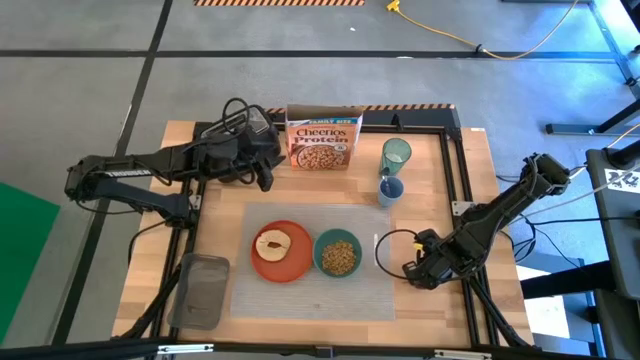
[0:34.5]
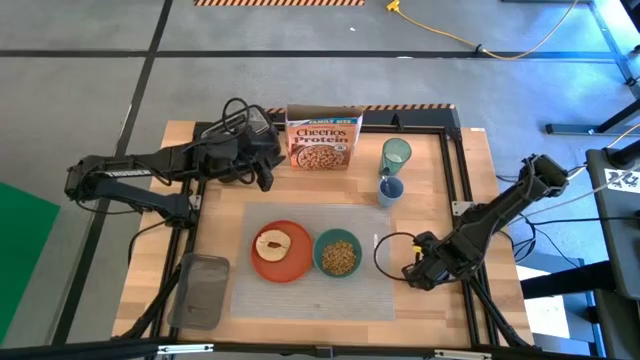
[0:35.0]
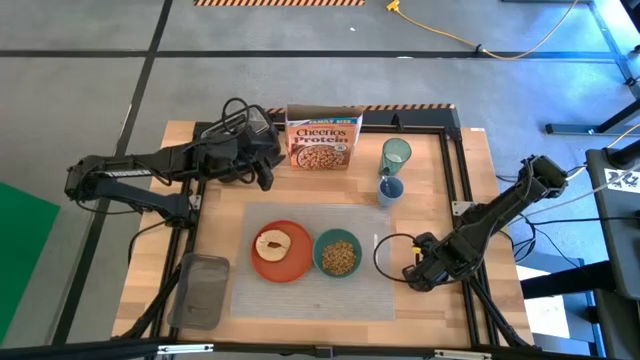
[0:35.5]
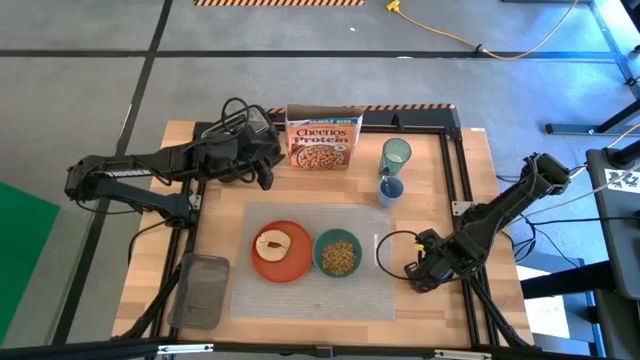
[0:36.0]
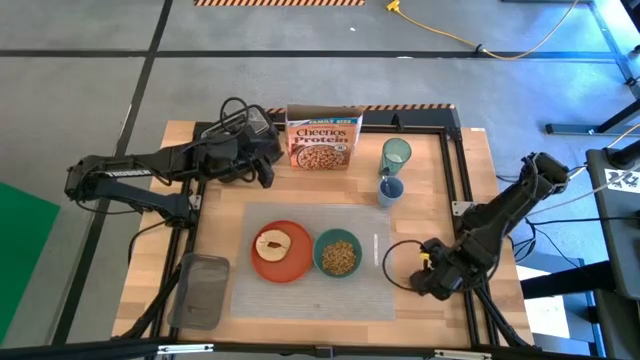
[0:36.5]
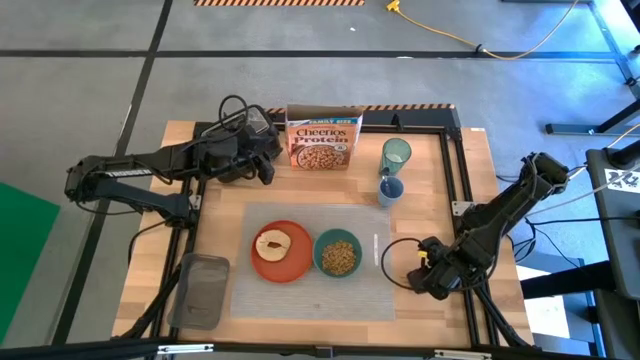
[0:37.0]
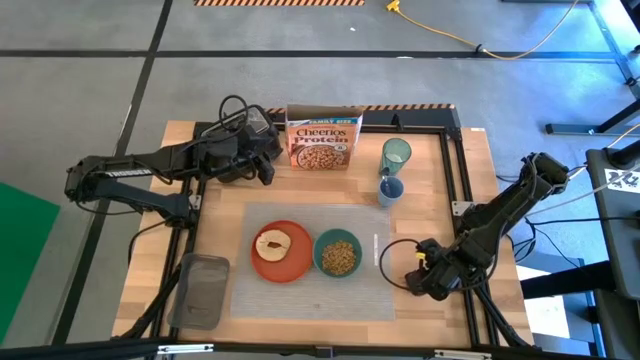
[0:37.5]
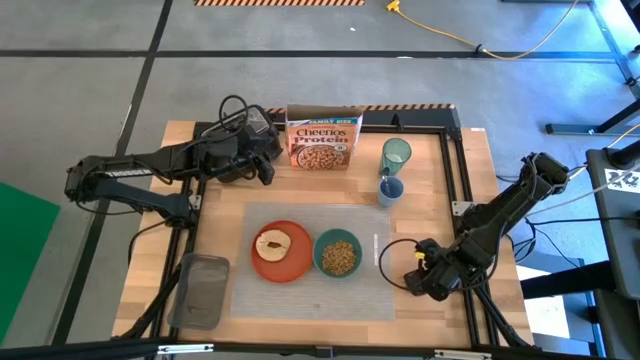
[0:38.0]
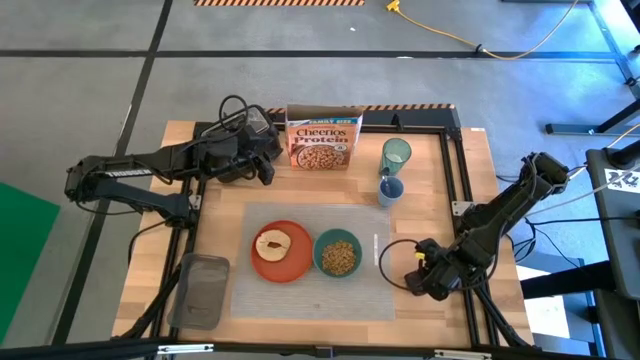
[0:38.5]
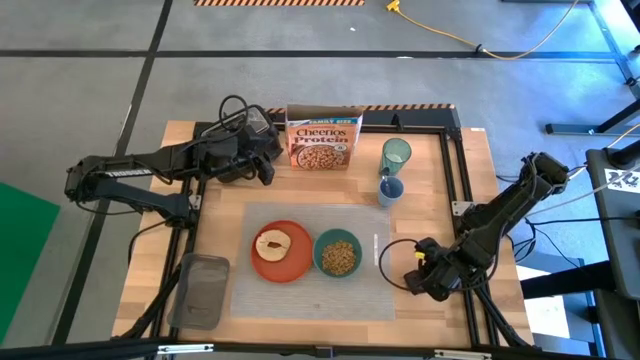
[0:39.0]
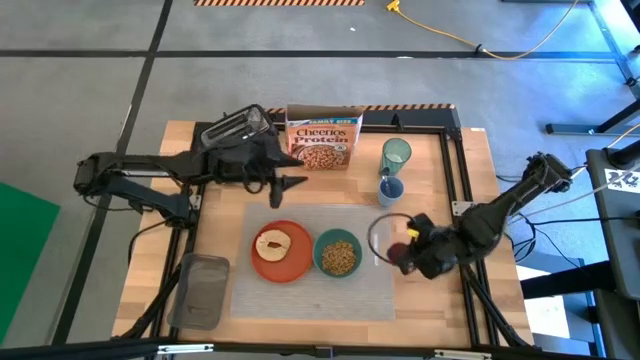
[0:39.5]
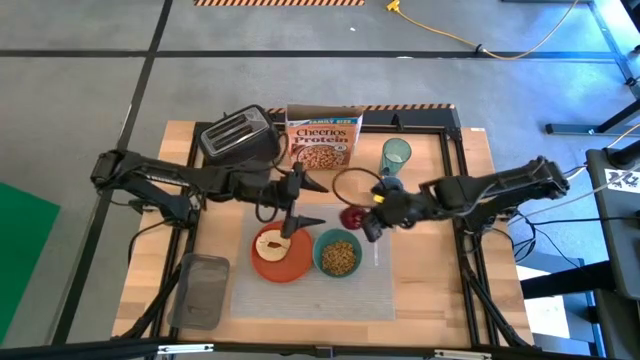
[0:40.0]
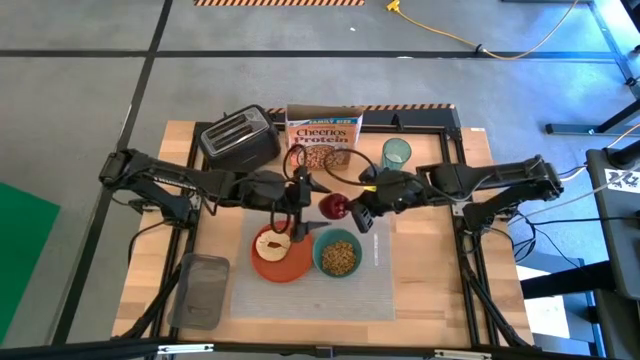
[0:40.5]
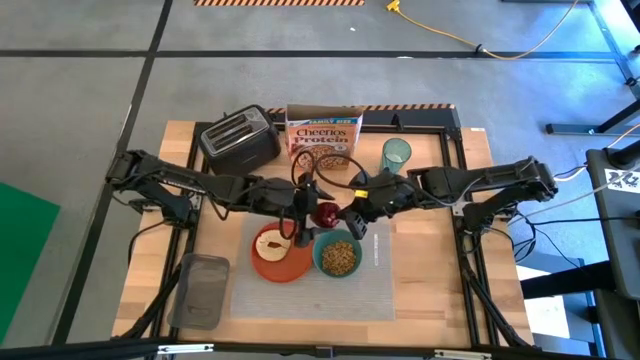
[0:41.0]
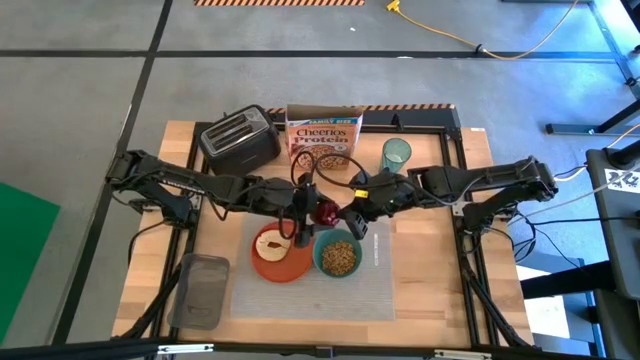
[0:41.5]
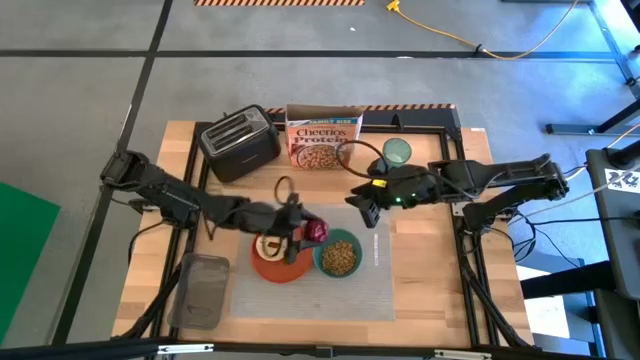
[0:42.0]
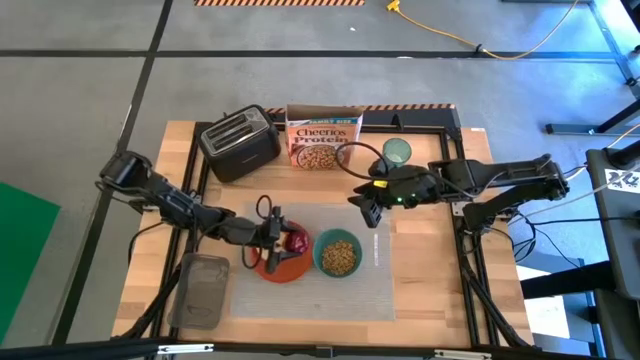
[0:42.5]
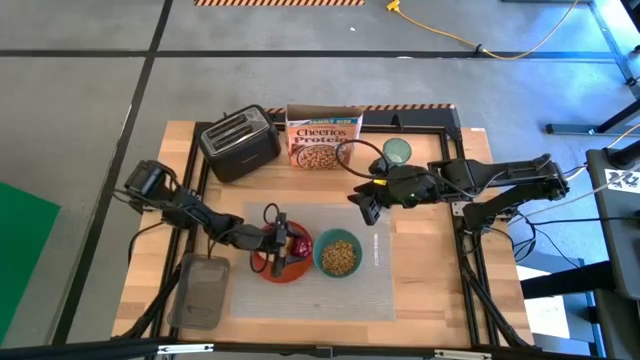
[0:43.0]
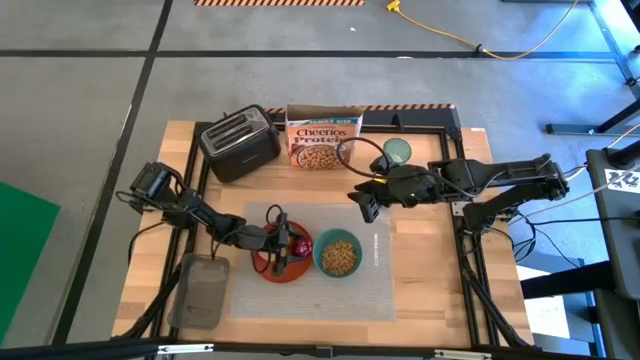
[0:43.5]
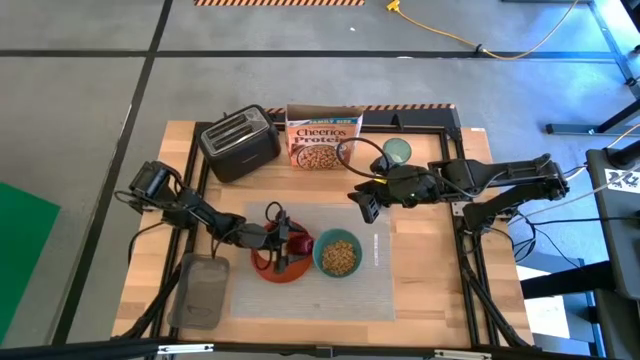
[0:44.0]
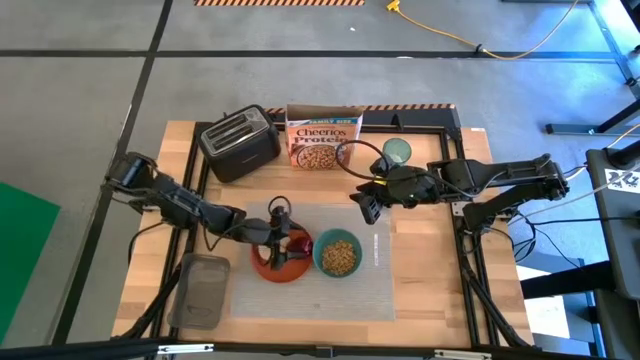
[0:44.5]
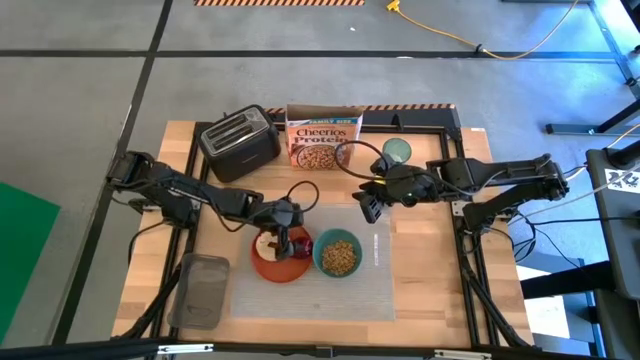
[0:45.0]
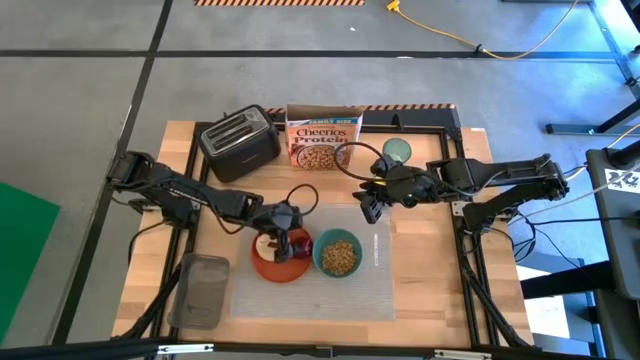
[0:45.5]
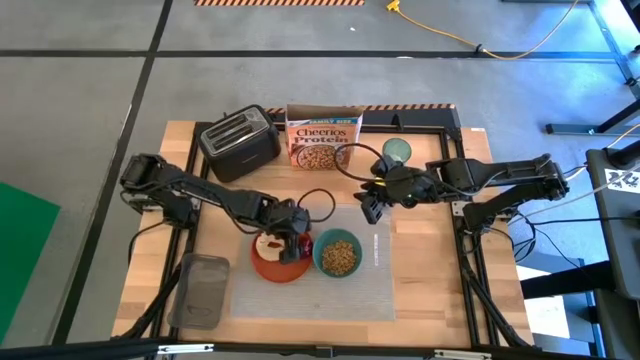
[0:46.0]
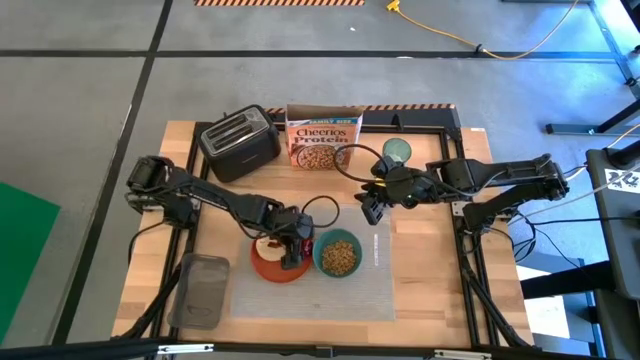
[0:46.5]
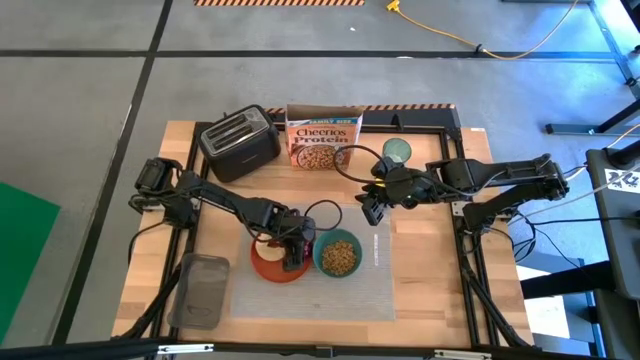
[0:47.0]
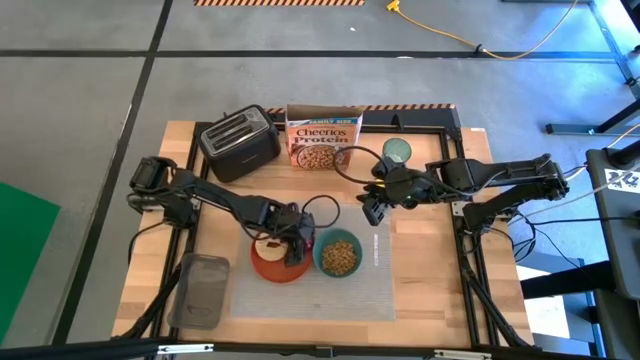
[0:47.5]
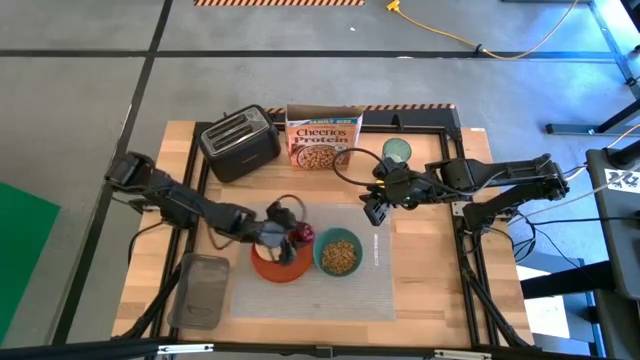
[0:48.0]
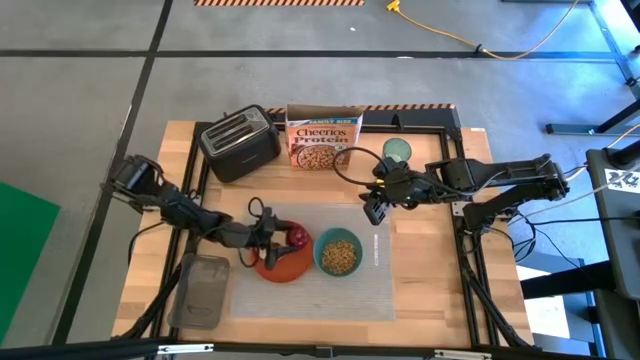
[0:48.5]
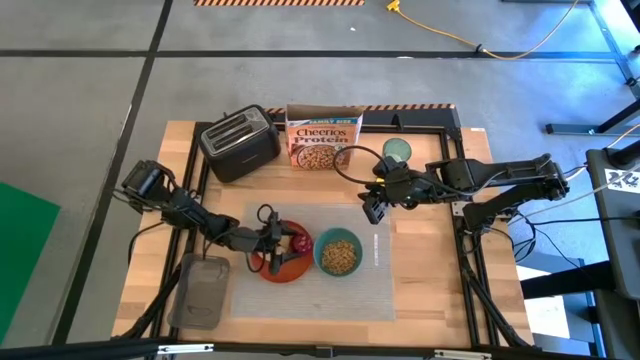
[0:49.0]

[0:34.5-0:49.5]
Task: Arrange a breakfast setting
Put the red apple on the orange plate

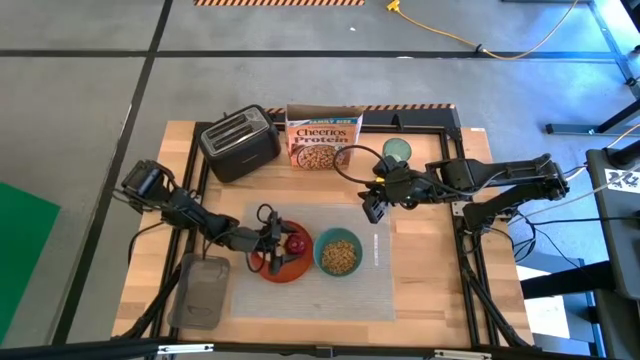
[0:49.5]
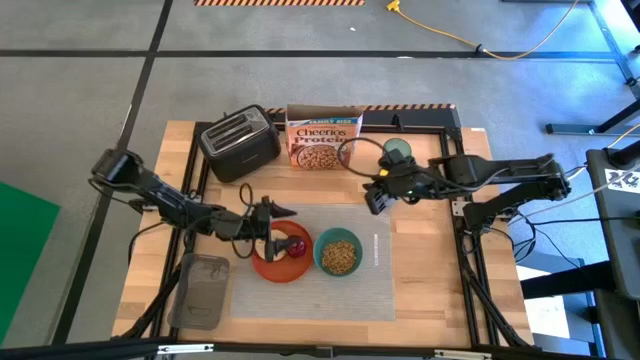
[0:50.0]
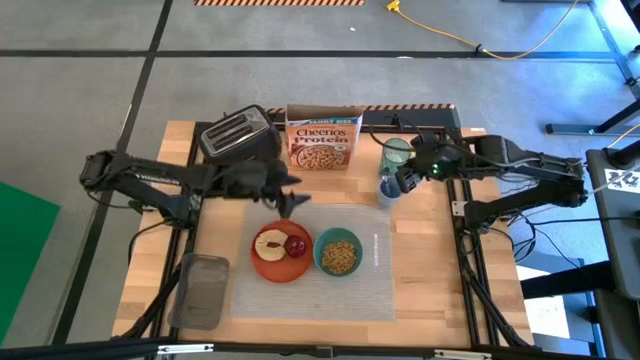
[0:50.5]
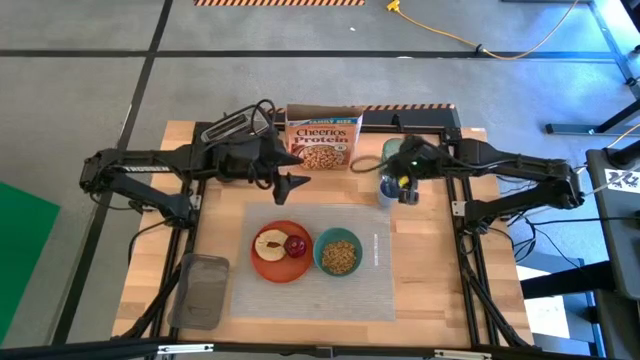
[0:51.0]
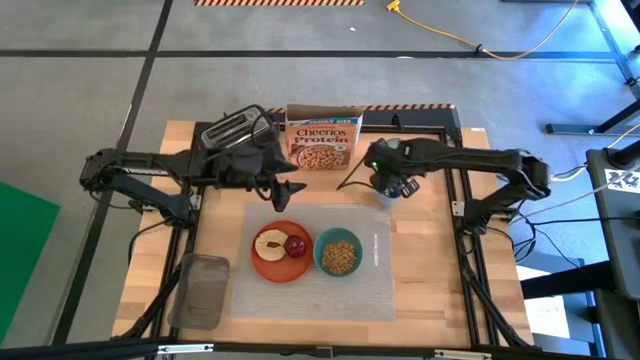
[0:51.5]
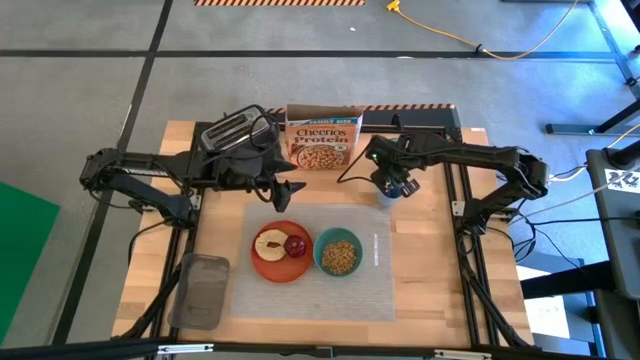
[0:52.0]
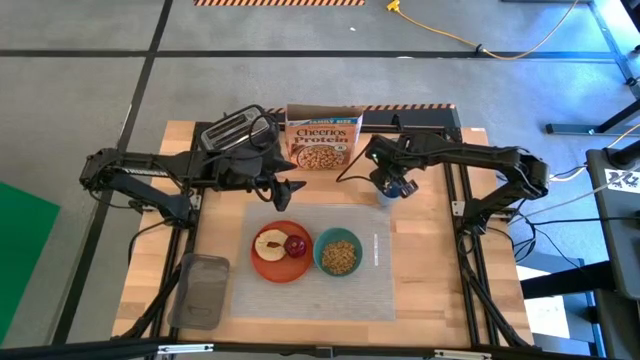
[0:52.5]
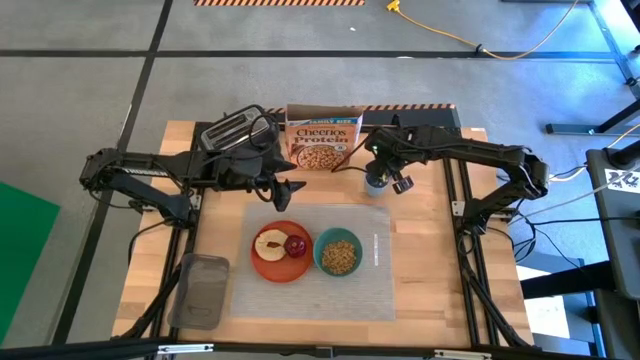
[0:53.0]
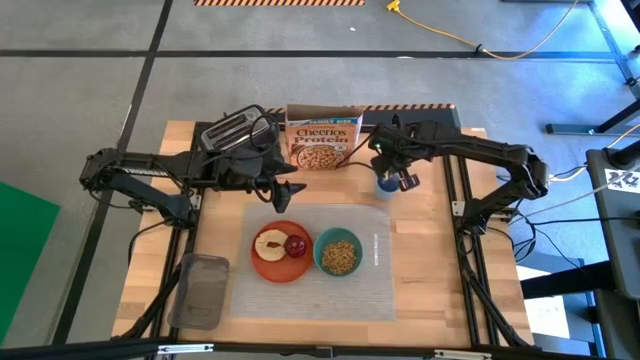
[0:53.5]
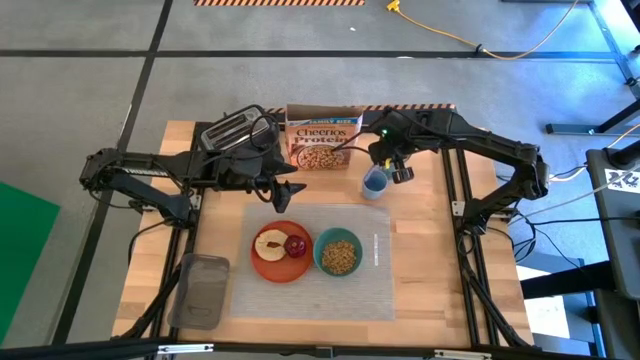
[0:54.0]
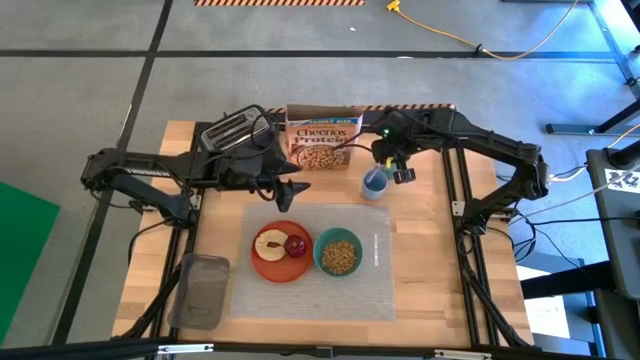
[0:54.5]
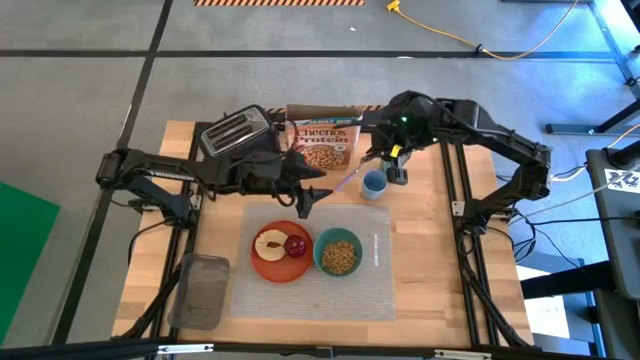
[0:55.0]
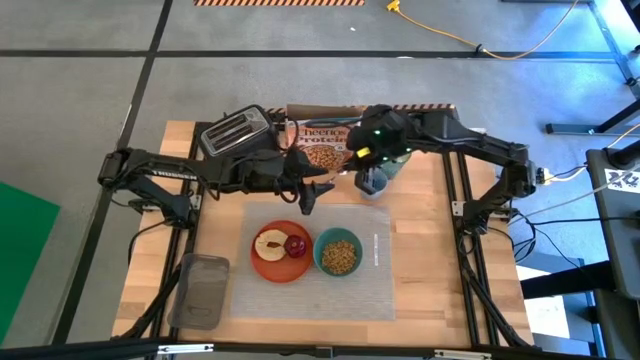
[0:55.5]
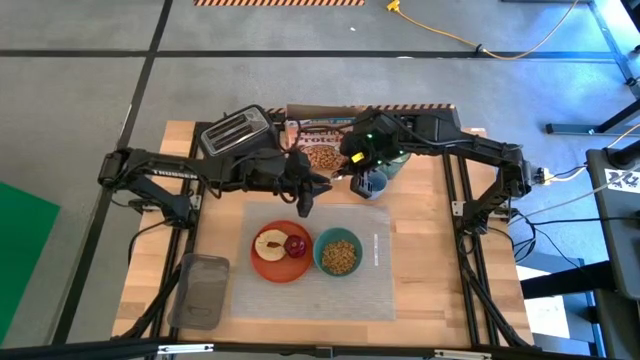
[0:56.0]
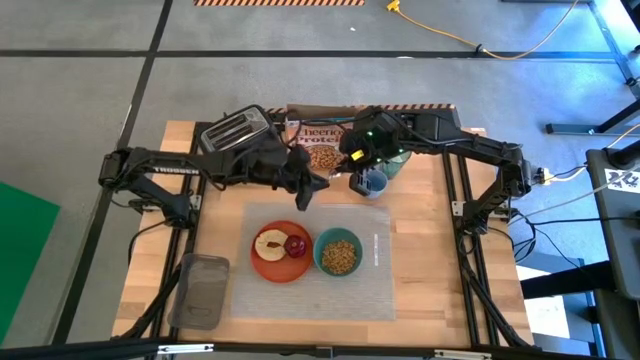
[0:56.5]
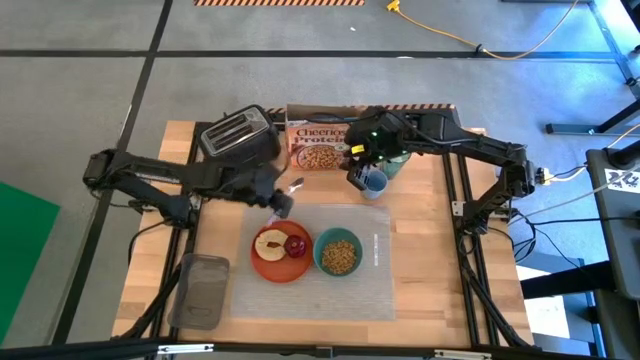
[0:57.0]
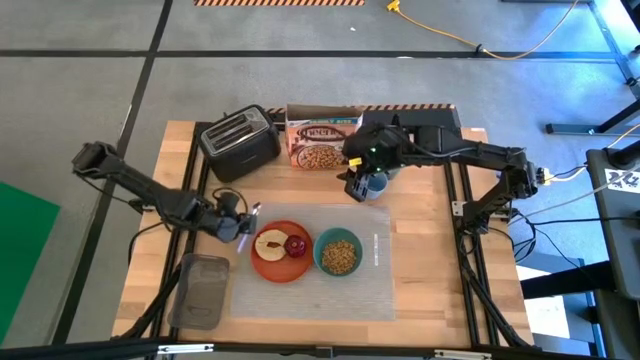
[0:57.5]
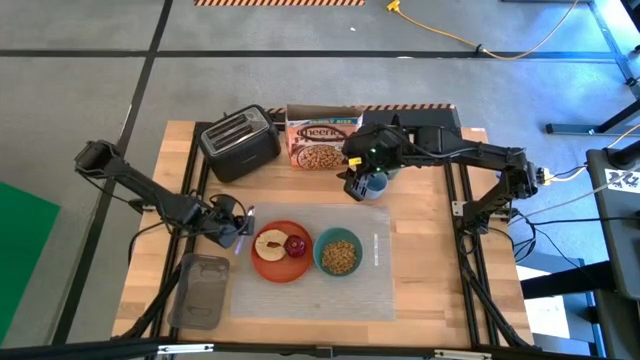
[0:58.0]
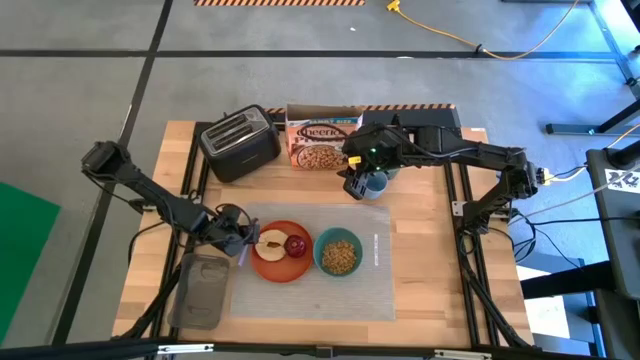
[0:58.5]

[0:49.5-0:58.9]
Put the purple spoon on the table mat to the left of the orange plate
